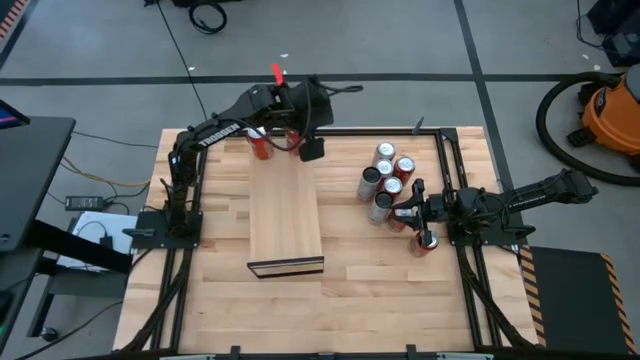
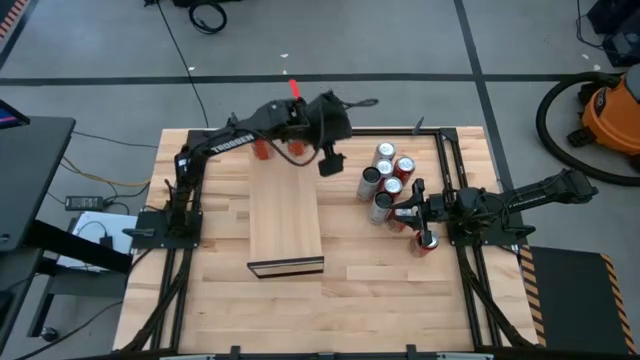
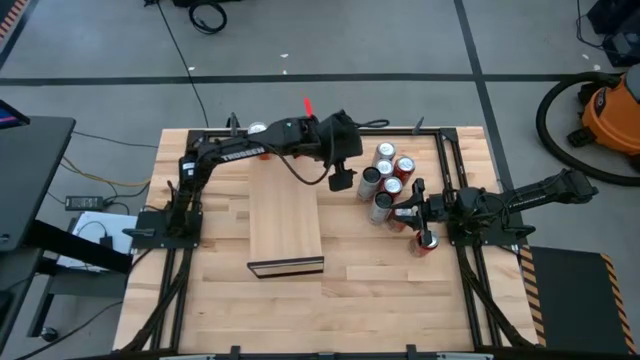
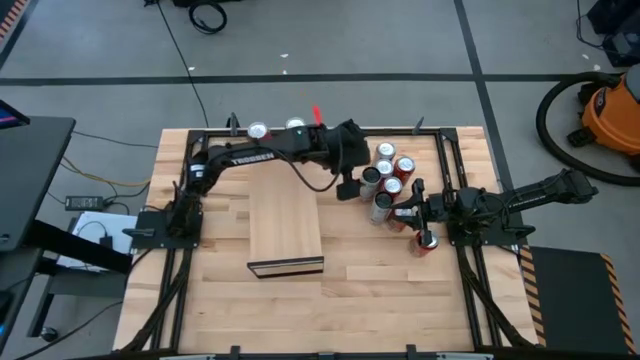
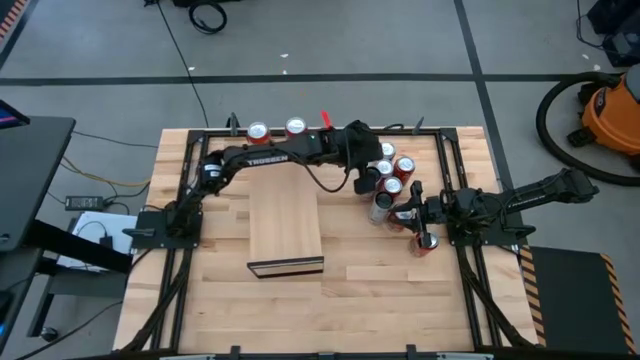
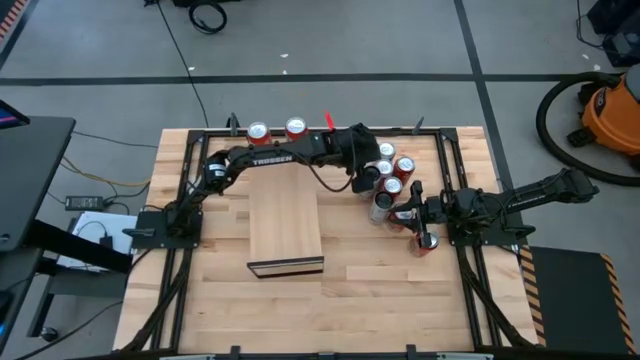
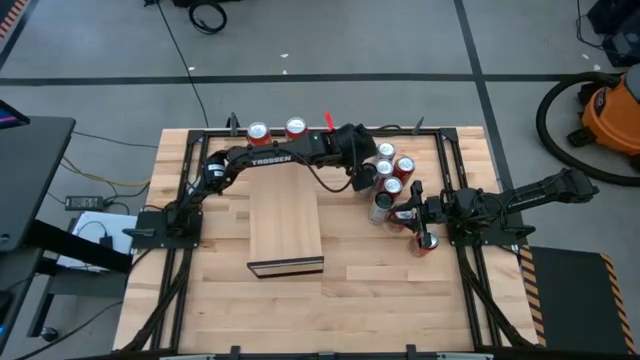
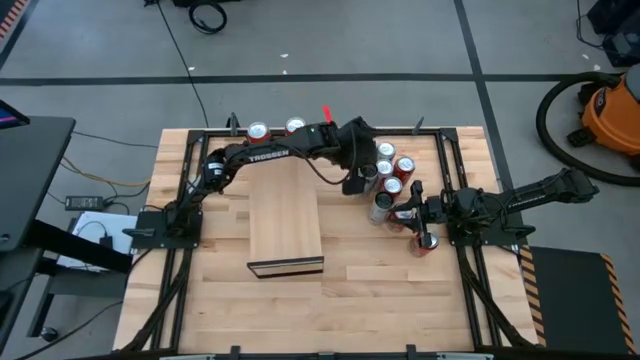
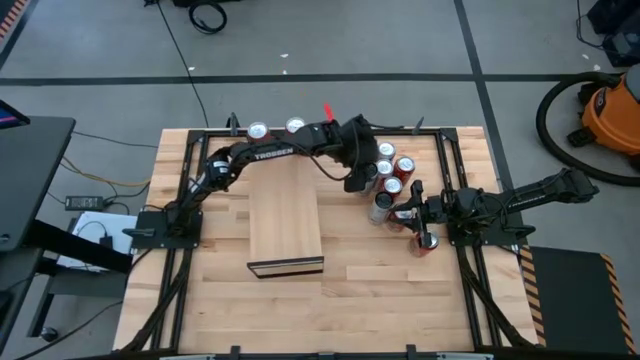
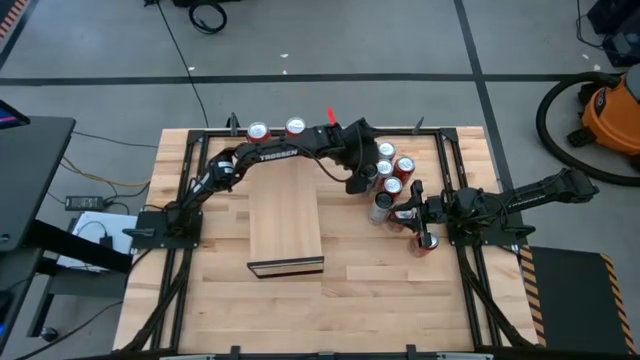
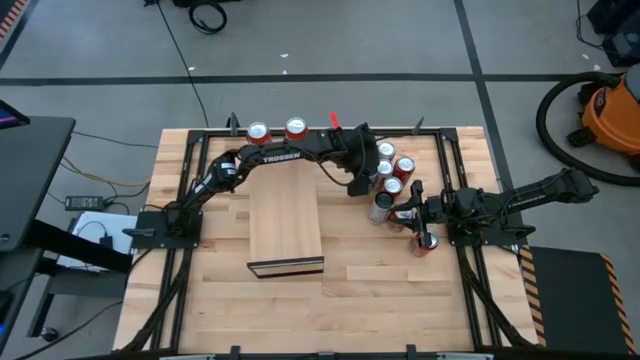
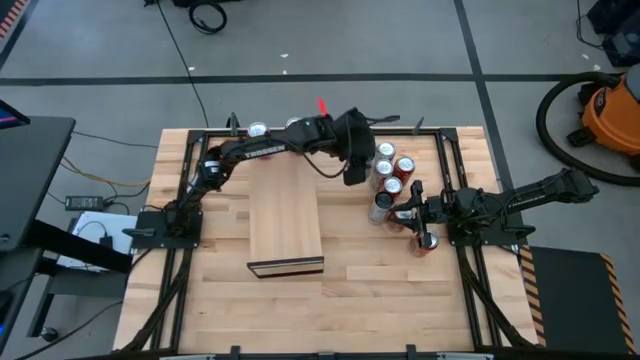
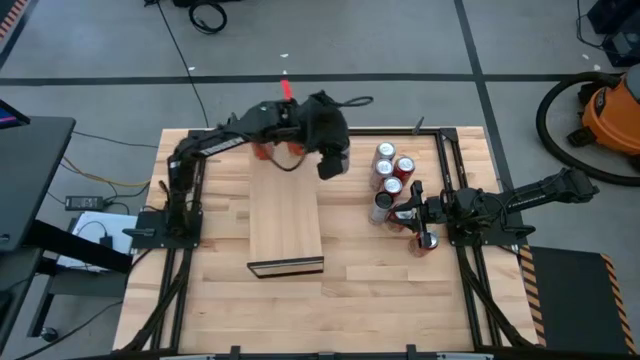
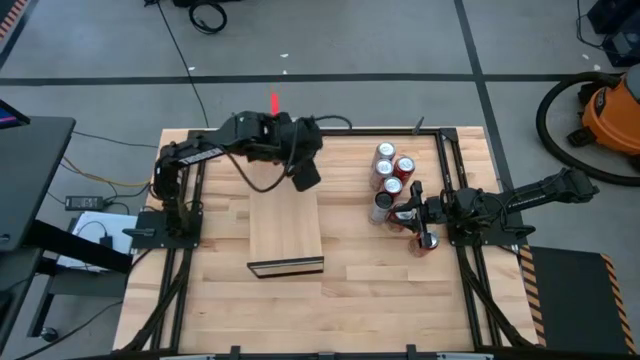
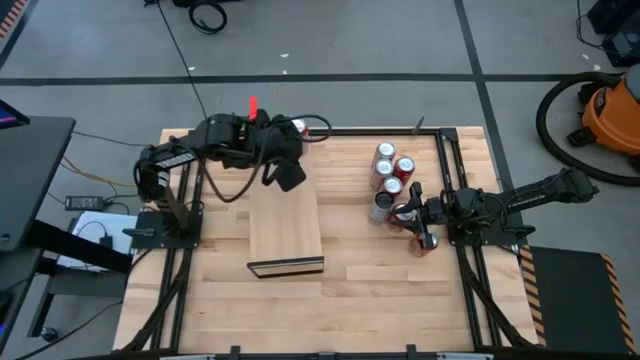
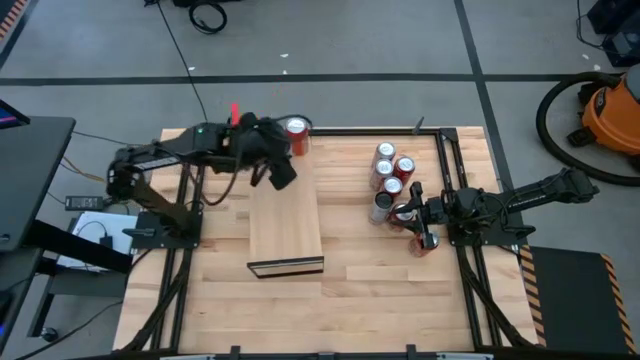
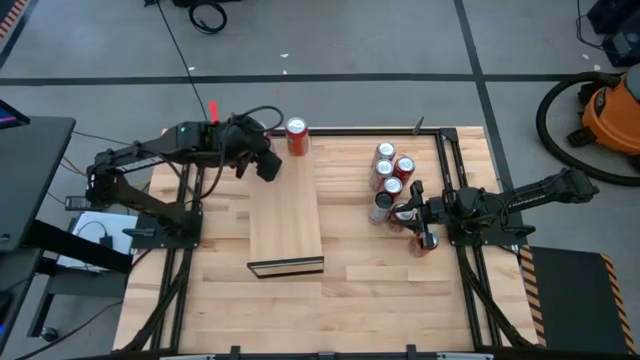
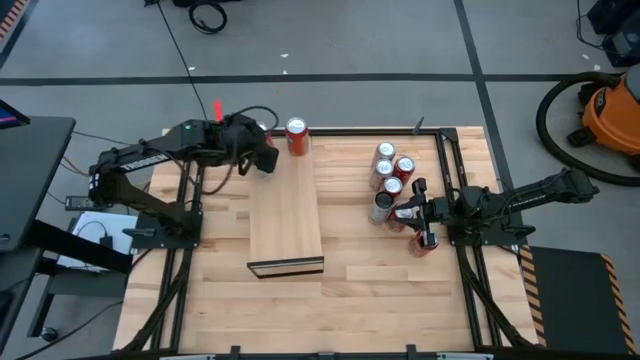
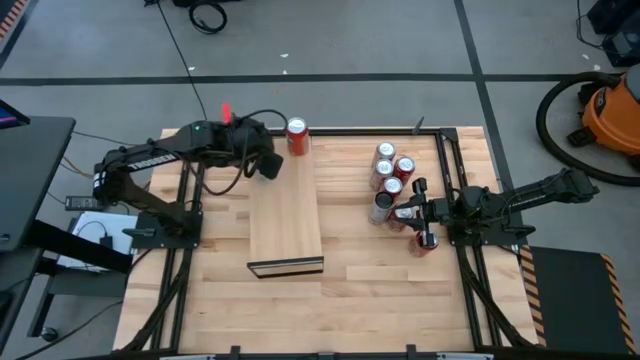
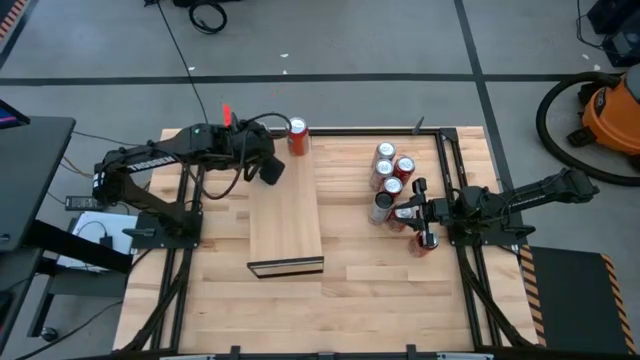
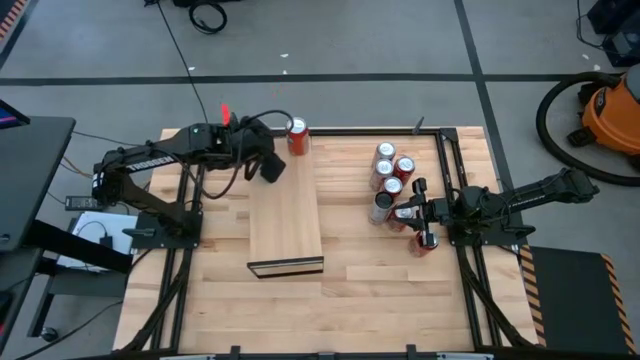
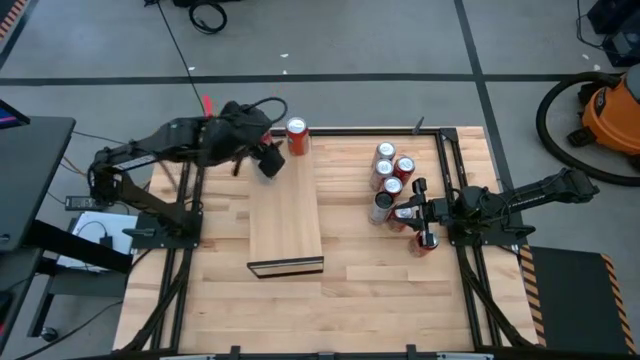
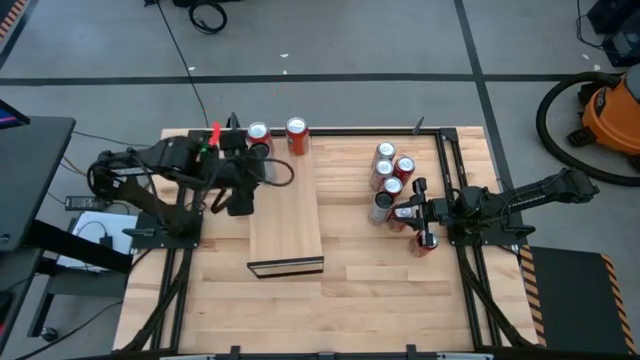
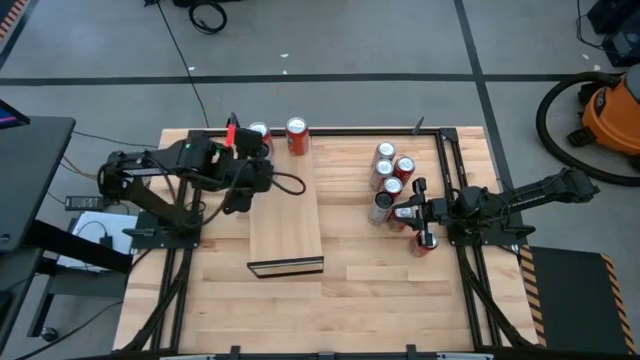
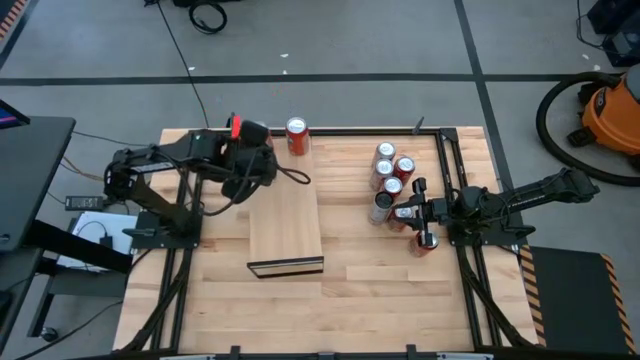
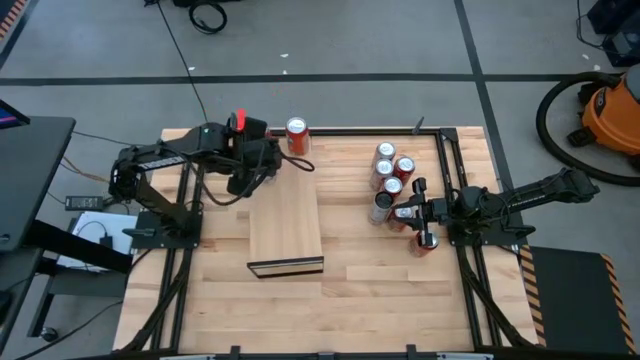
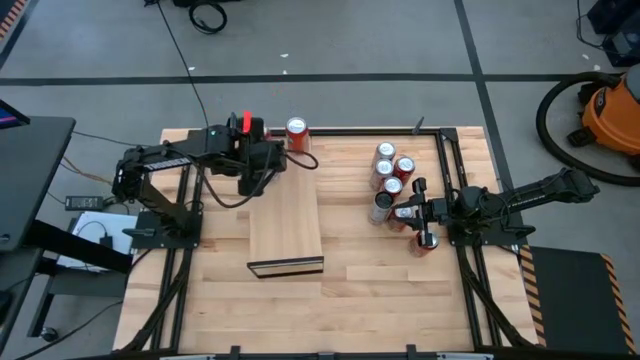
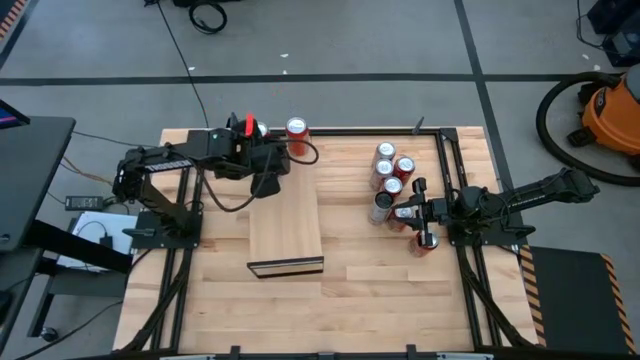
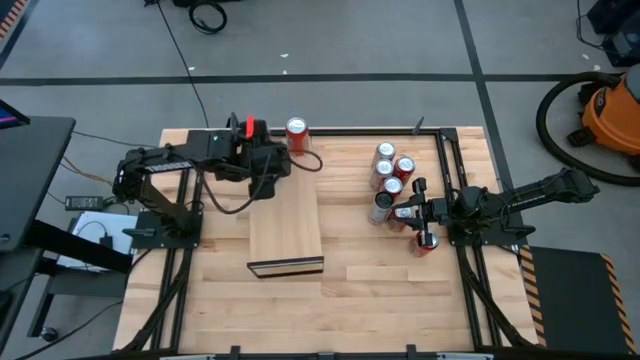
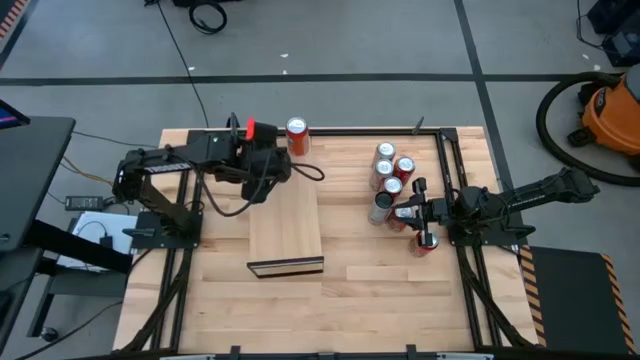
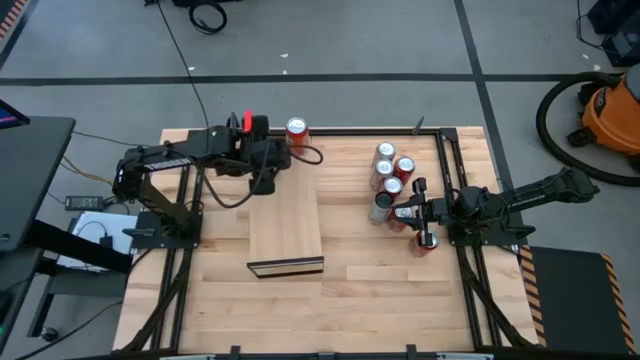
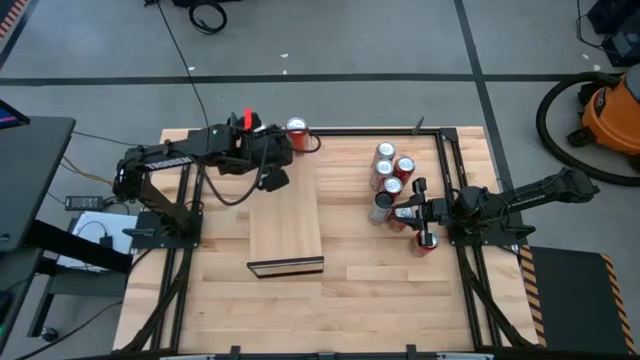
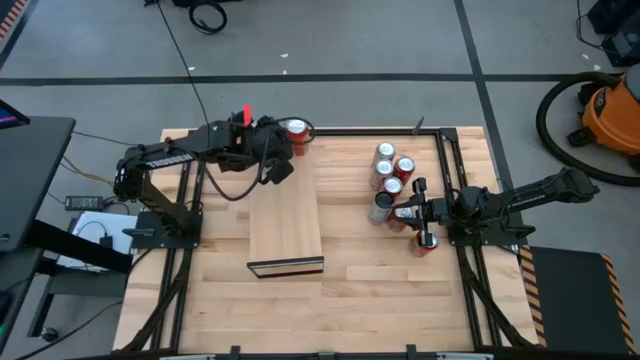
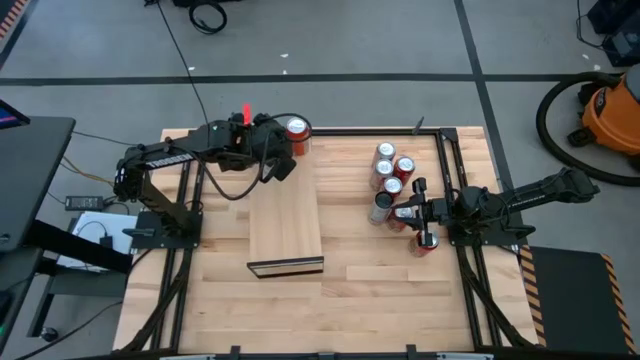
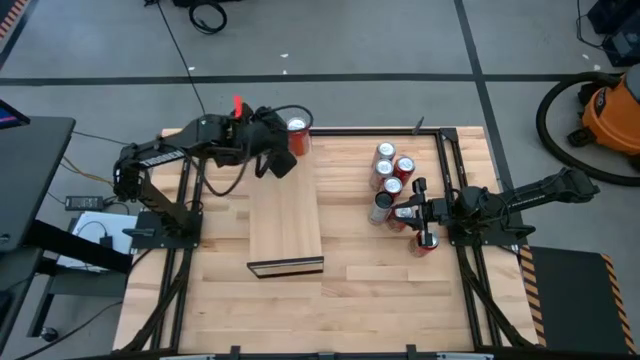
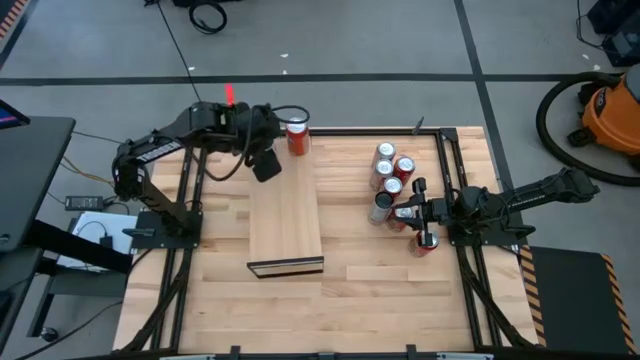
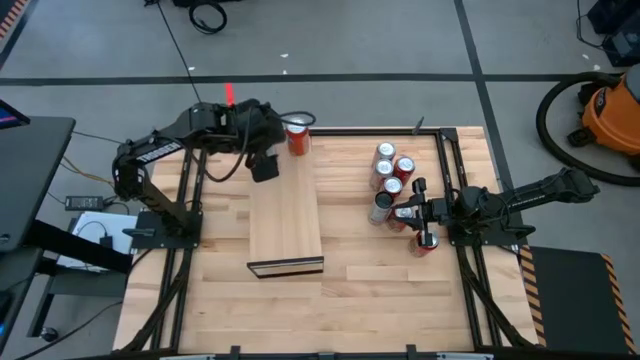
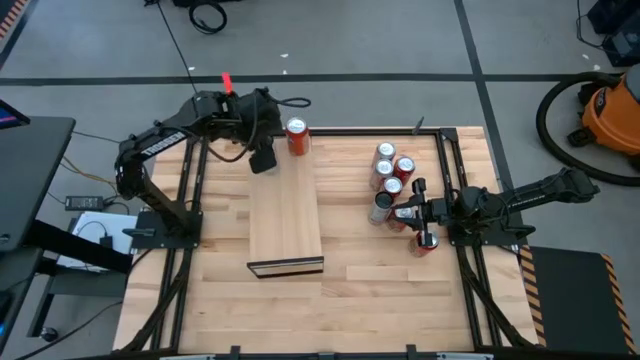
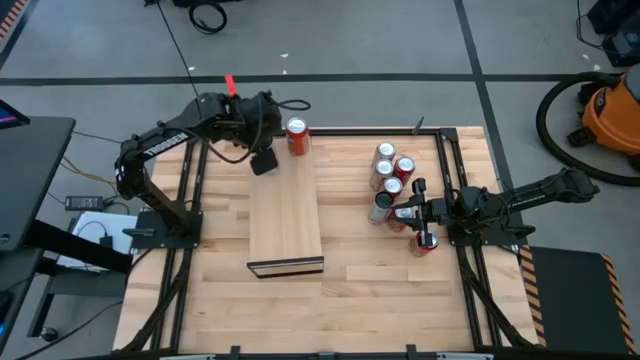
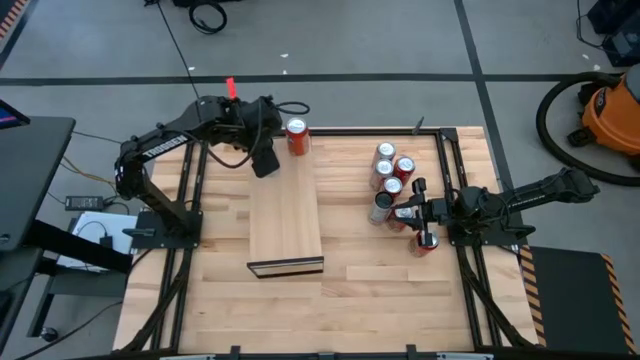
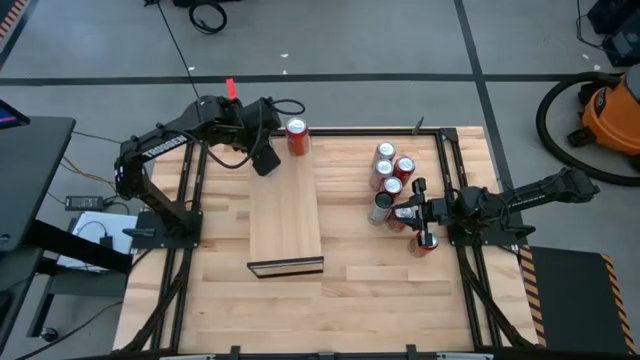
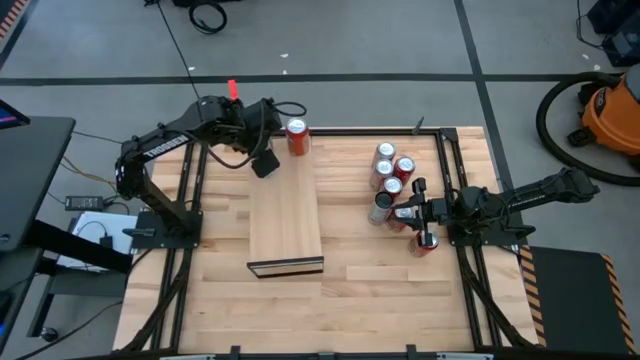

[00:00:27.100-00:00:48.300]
Task: Place canned beverage on shelf
Put the top white and black soda can on the shelf
